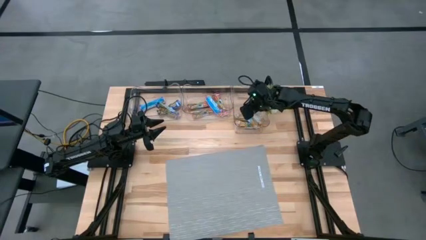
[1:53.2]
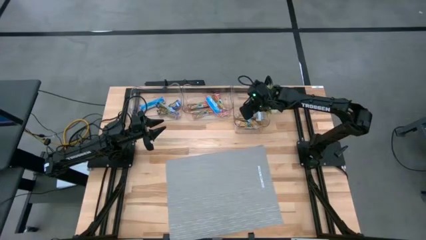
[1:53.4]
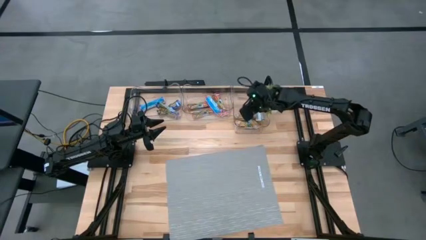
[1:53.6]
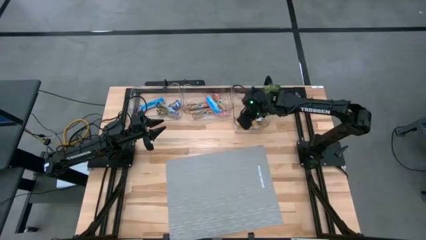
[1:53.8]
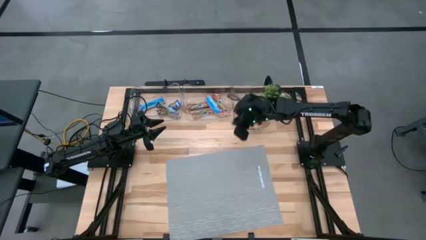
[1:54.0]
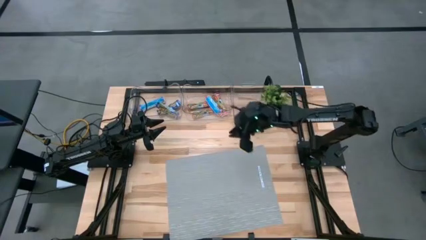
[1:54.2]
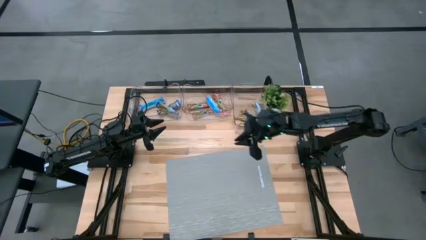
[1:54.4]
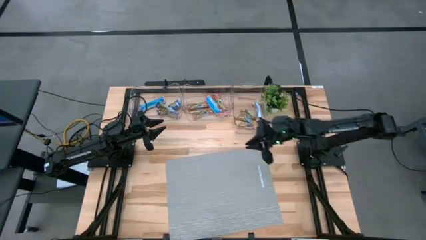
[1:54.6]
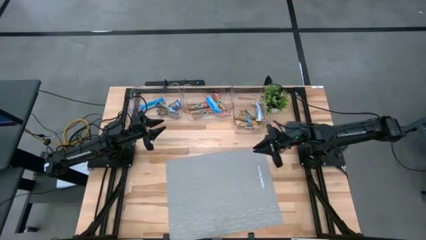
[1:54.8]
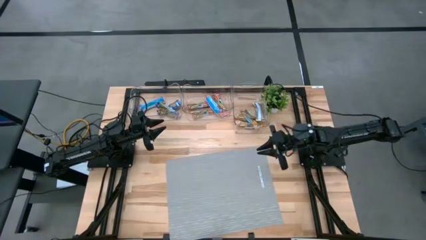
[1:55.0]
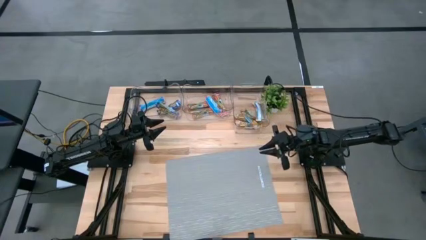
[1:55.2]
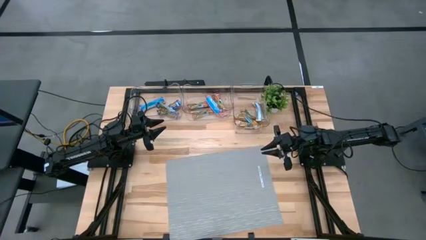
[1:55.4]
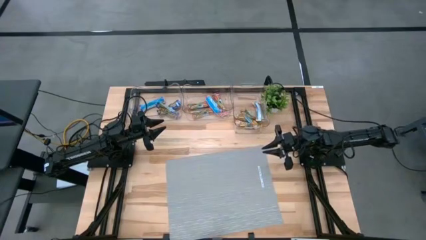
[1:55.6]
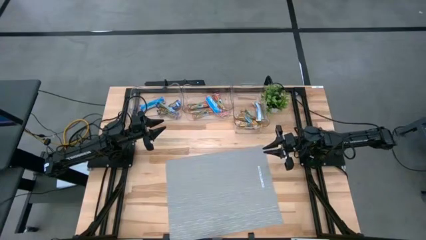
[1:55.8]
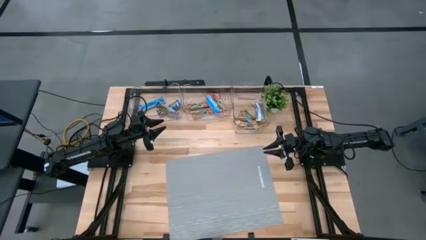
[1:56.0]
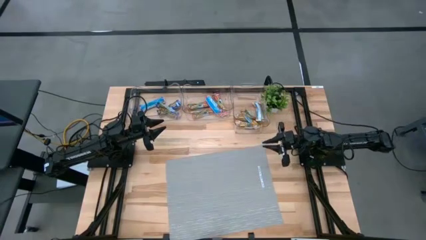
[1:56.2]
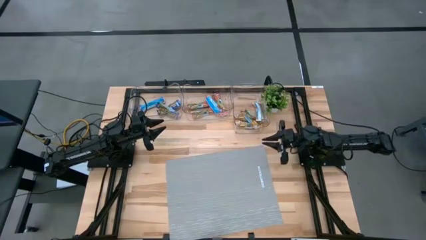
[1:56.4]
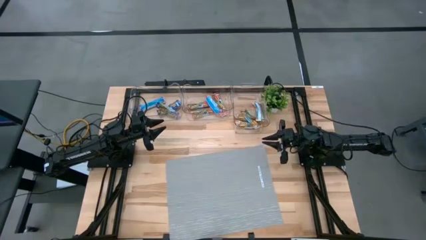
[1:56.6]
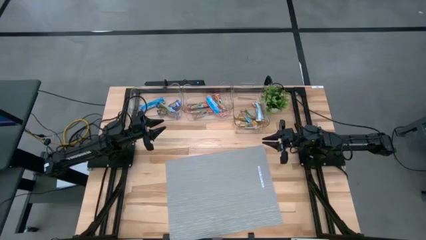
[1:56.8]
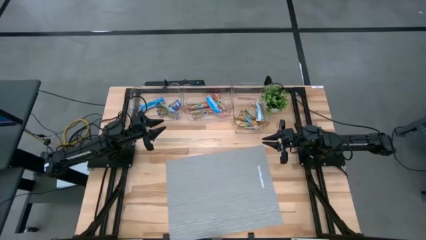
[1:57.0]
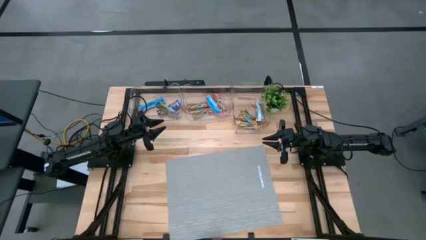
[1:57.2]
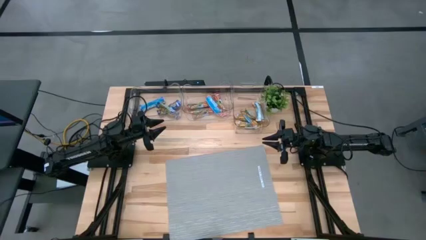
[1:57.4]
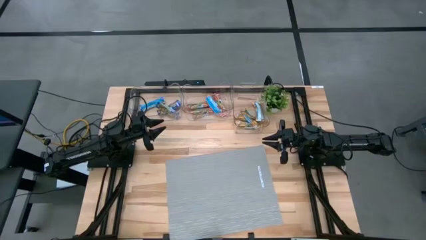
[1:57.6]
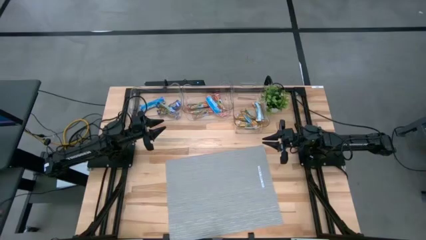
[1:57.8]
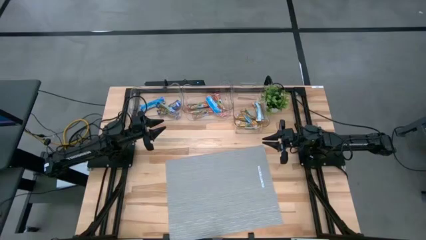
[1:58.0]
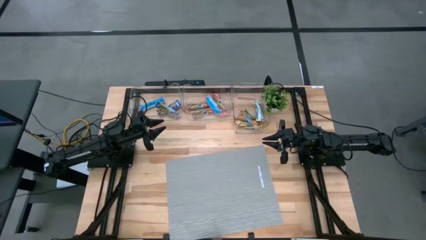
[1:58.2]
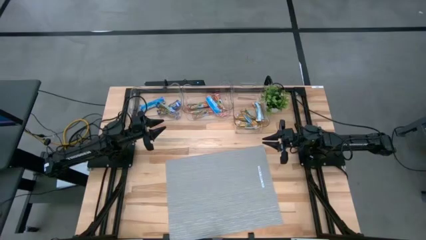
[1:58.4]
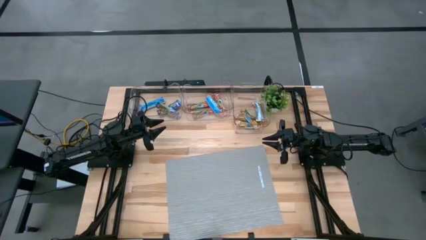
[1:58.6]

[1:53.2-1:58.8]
Task: Pick and place Granola Bars by type
Return to Home position

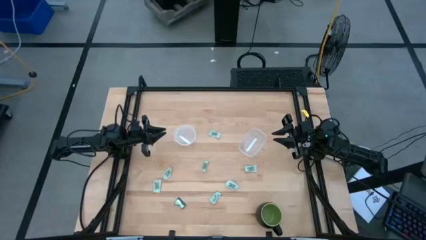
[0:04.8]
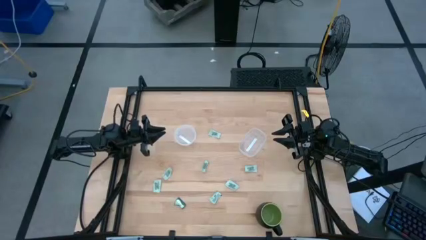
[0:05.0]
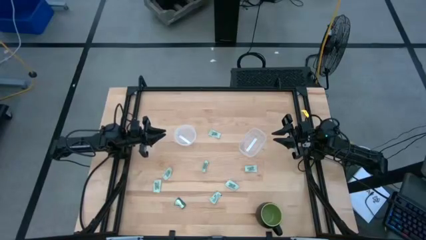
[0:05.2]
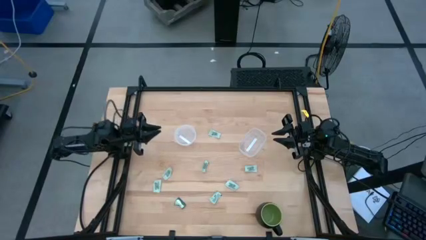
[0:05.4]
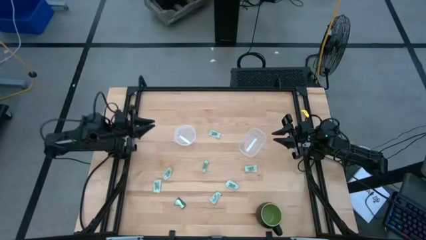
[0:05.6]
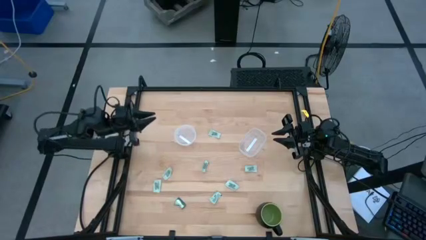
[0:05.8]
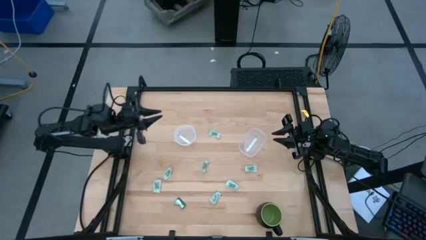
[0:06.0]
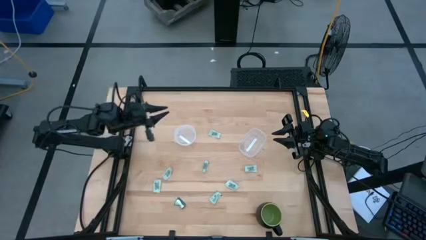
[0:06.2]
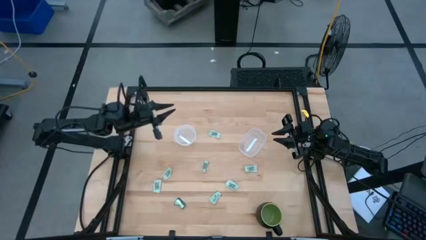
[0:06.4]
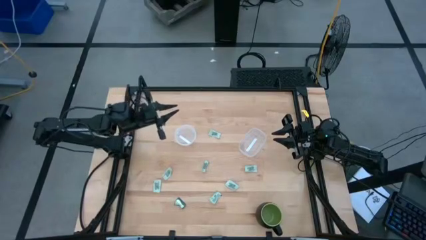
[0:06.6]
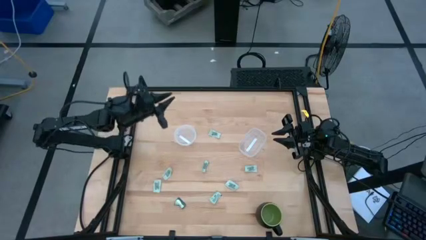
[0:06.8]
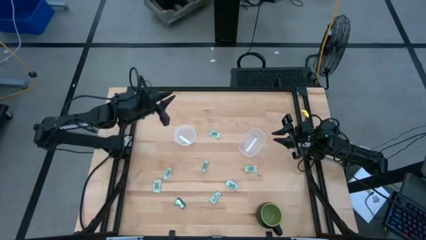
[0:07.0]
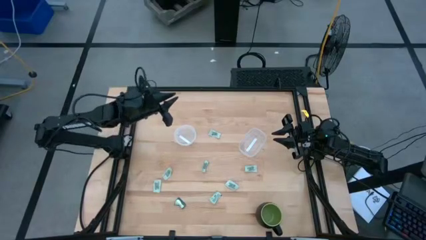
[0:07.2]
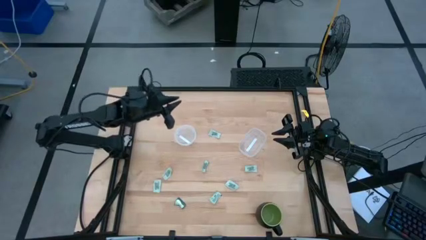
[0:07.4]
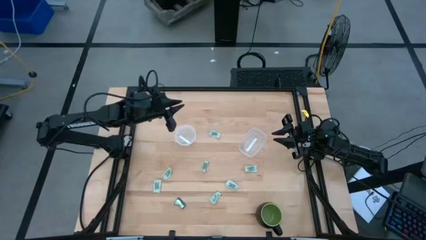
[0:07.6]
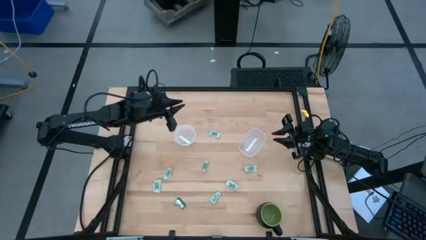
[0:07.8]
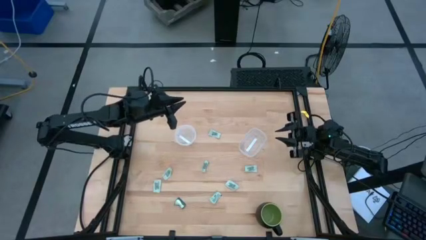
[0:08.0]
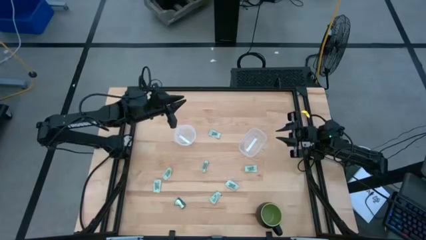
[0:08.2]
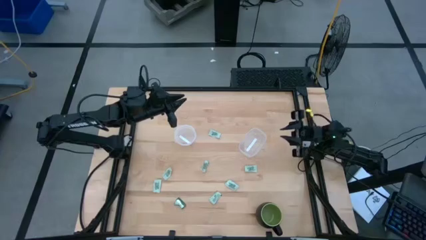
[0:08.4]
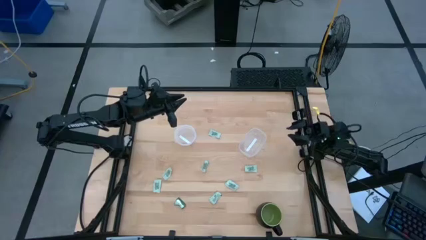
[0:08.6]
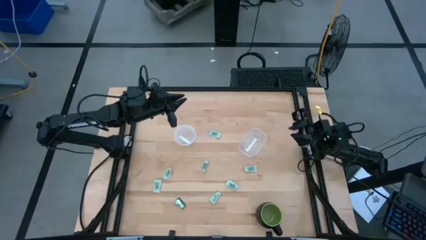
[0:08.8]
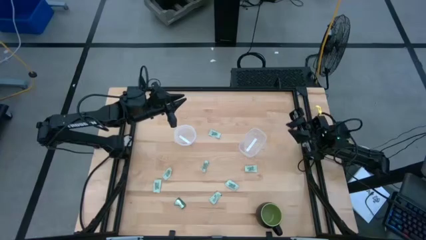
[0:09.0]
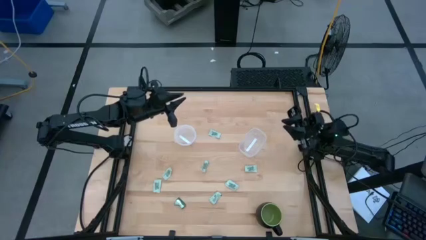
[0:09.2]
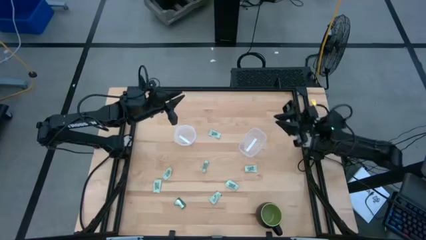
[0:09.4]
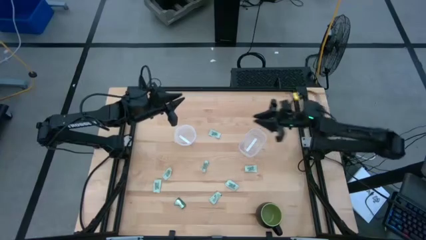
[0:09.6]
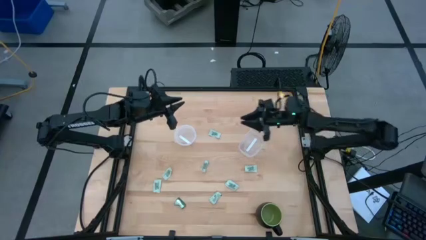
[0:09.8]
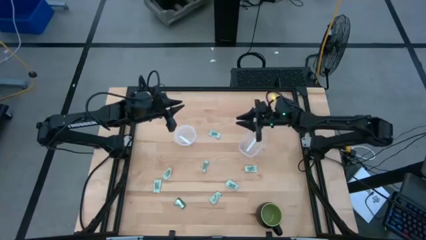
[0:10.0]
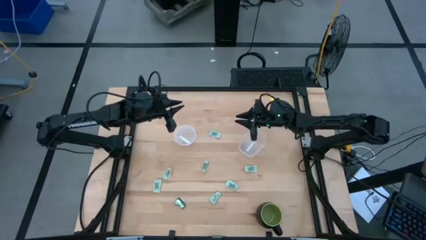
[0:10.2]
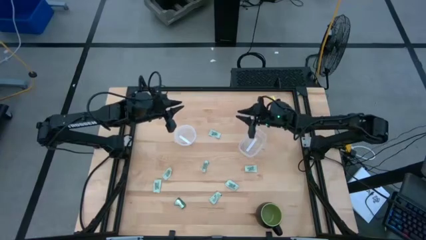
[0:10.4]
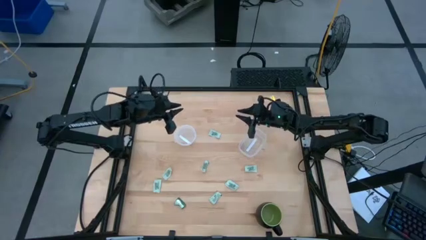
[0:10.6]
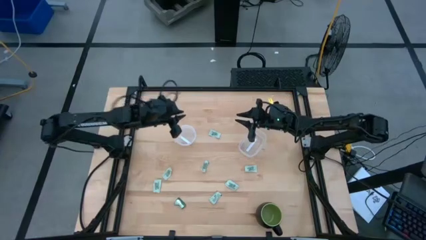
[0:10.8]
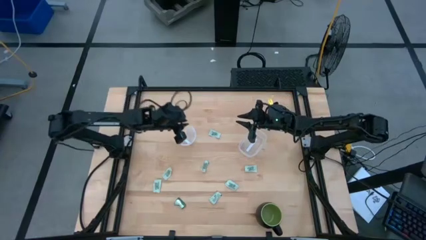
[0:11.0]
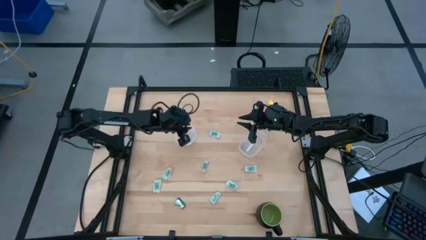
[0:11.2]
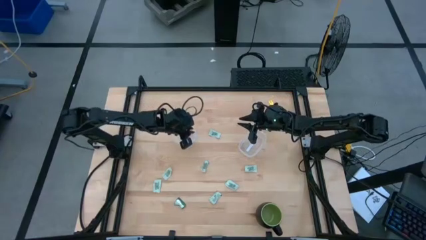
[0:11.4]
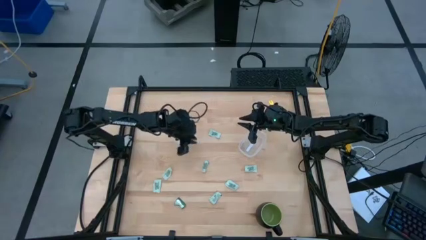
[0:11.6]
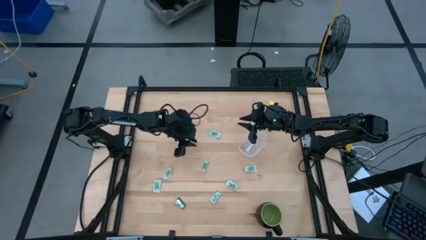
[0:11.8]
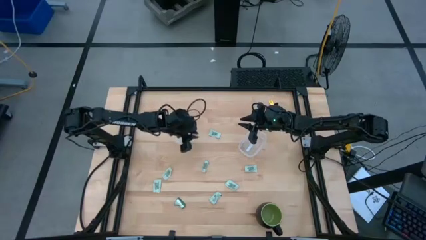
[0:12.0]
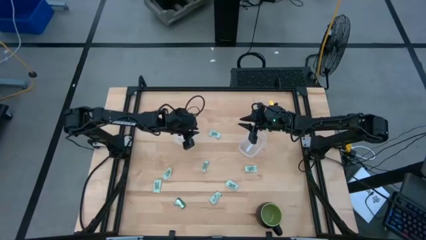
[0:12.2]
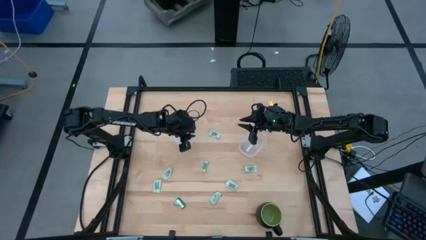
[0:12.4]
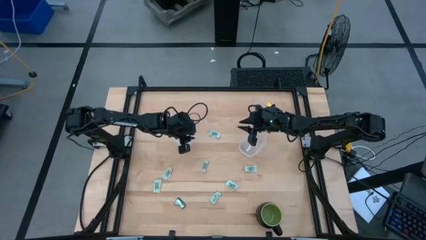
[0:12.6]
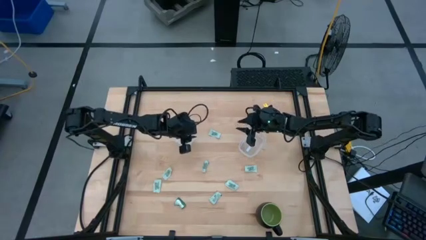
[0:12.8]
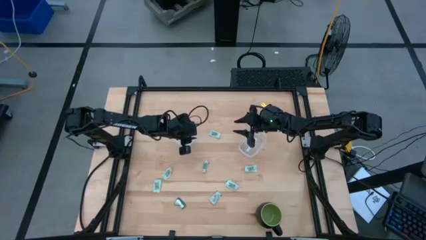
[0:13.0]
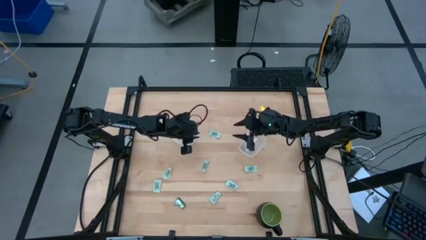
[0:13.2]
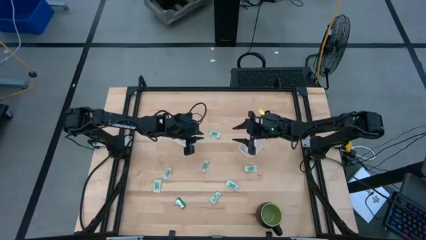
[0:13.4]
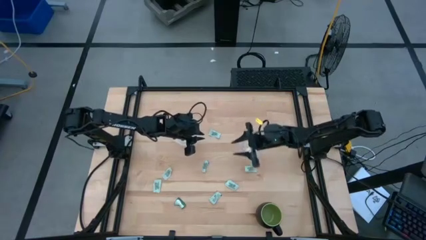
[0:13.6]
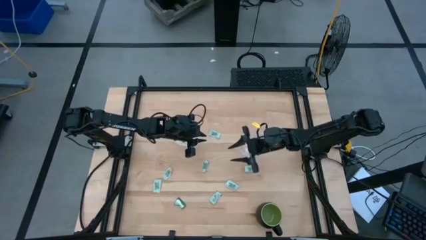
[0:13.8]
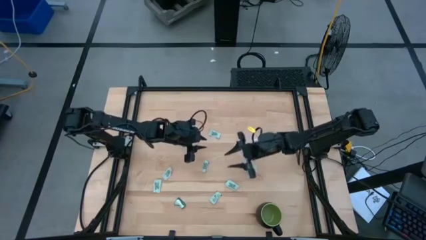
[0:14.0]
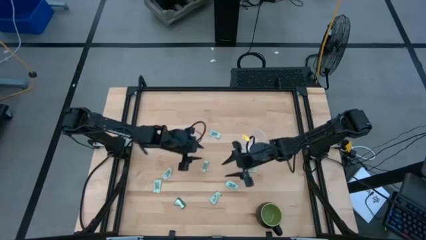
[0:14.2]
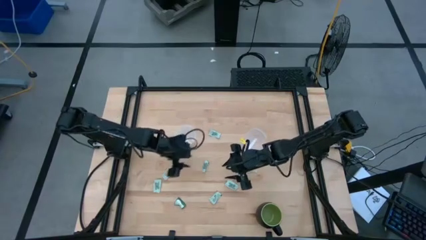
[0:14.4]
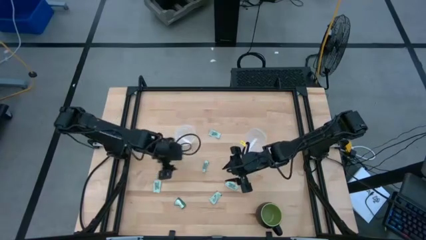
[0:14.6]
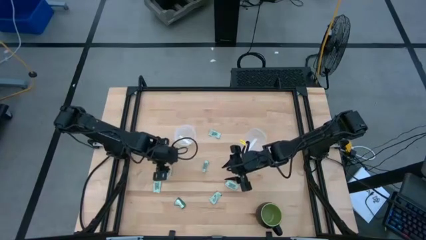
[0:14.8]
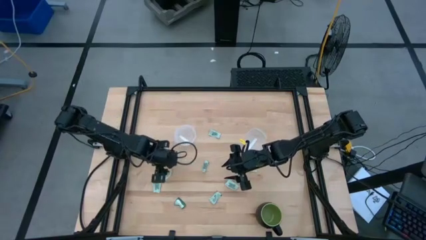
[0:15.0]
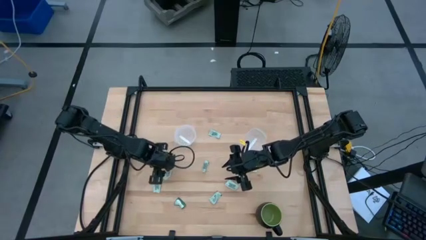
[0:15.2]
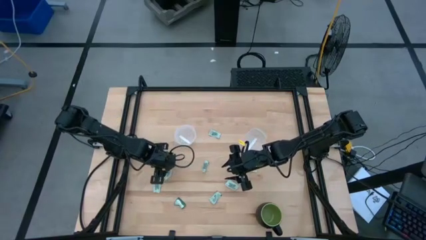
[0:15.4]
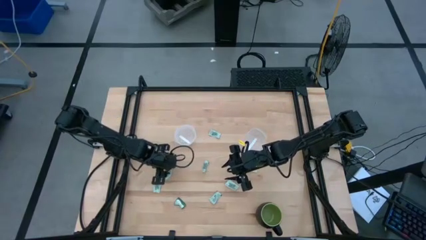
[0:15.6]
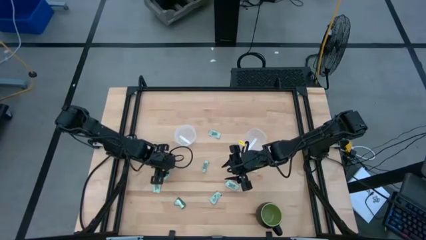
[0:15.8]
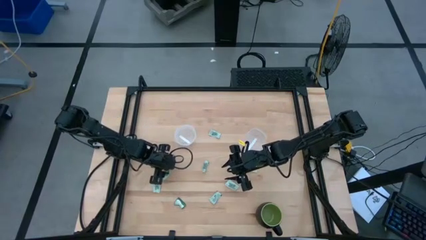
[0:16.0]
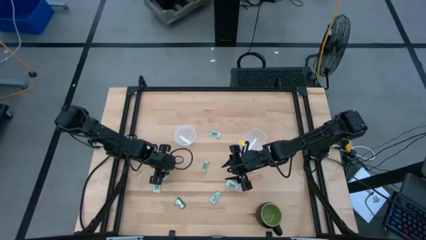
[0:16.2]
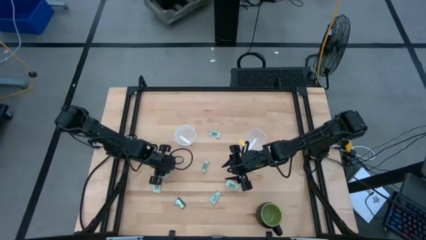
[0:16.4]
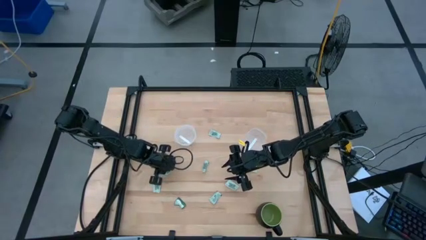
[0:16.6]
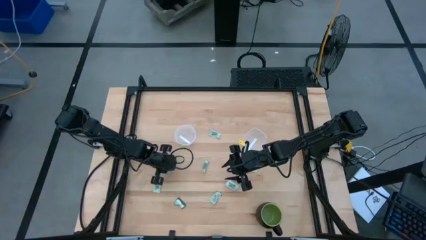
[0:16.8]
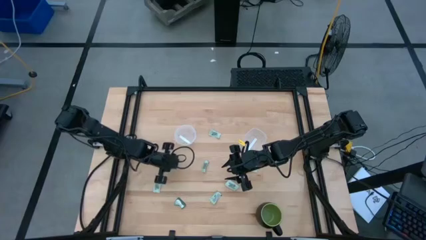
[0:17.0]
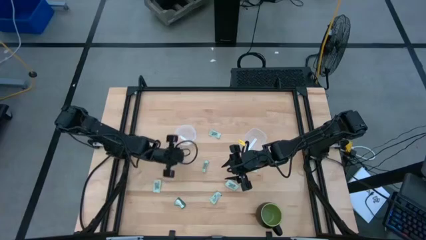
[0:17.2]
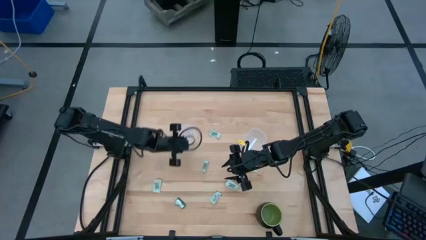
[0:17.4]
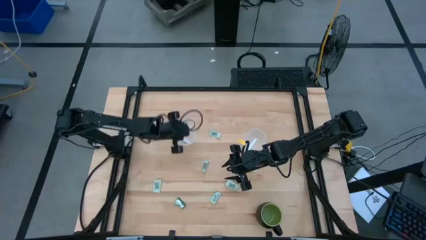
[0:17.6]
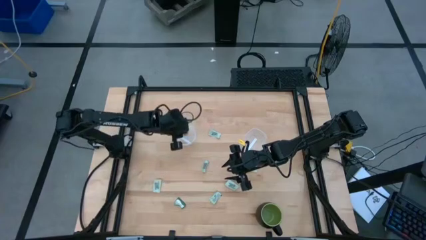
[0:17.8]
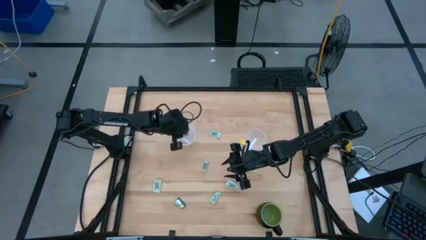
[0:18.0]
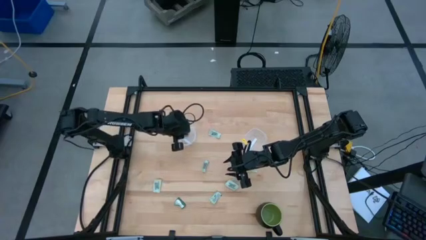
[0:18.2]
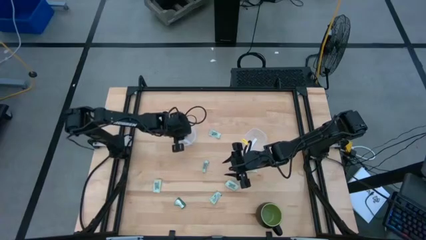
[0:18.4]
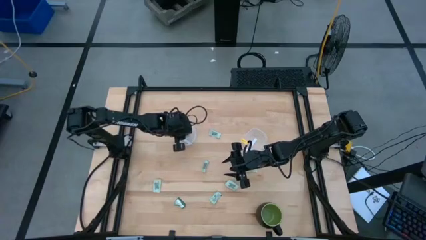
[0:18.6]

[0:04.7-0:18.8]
Task: Pick and place Stevia / Truvia into bins
Put the white stevia packet into the left transparent container
